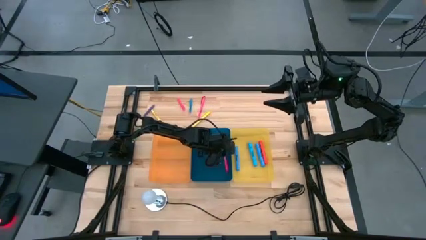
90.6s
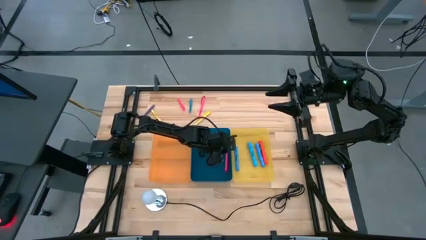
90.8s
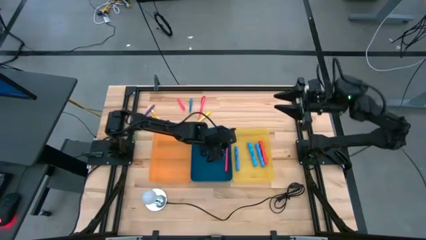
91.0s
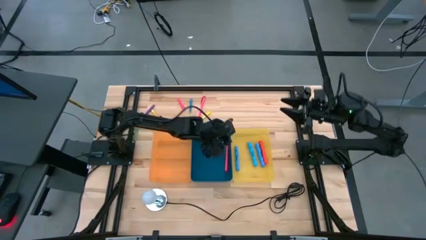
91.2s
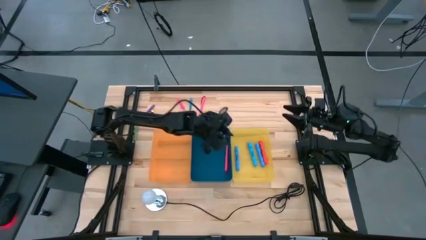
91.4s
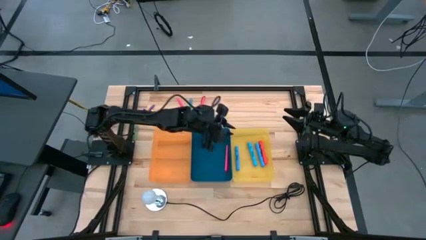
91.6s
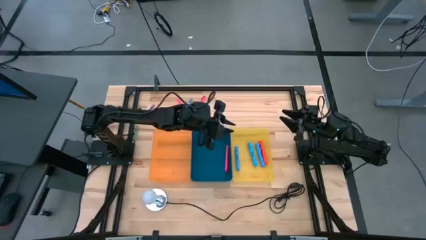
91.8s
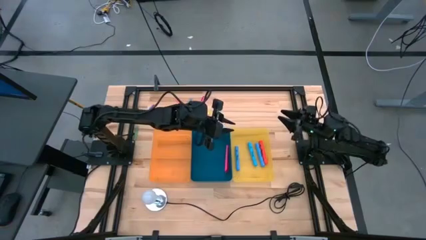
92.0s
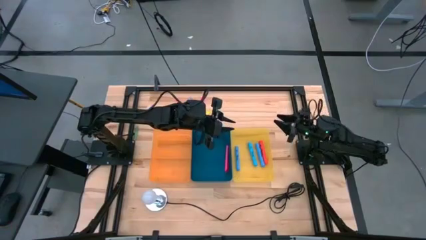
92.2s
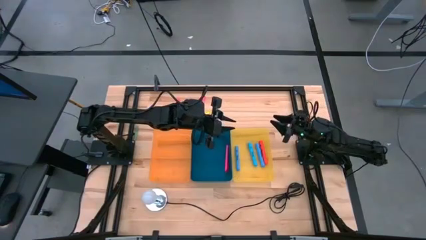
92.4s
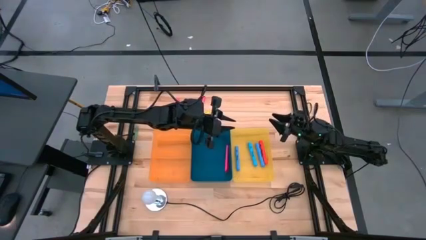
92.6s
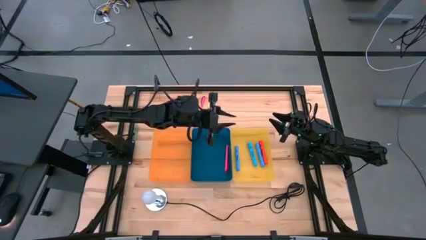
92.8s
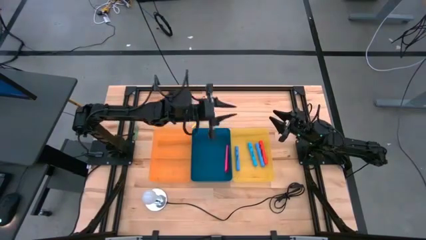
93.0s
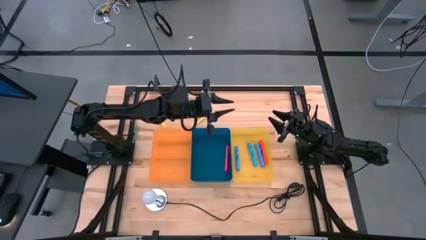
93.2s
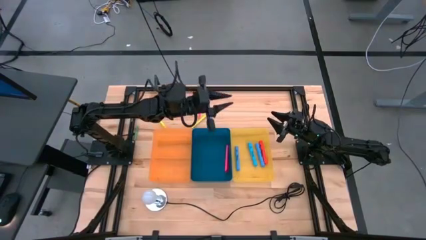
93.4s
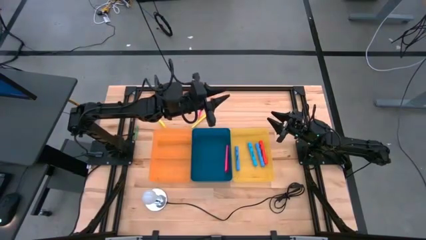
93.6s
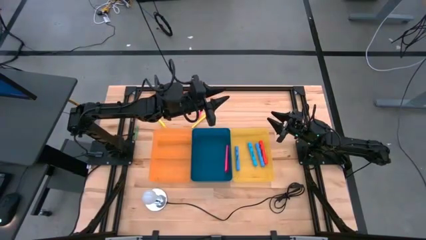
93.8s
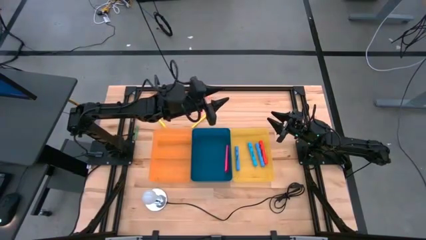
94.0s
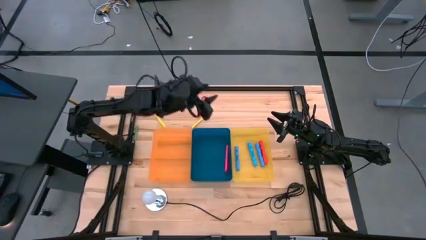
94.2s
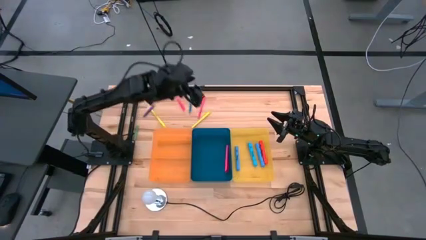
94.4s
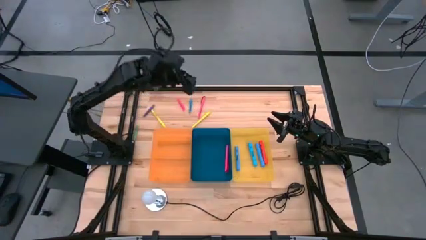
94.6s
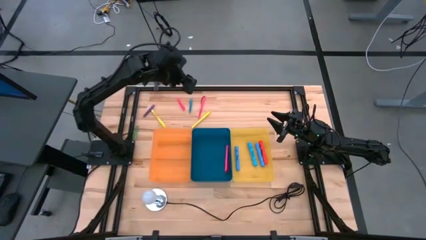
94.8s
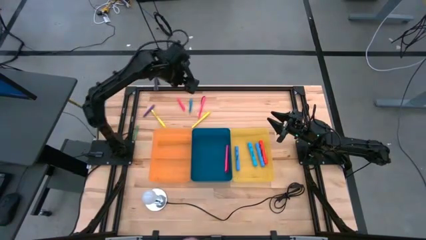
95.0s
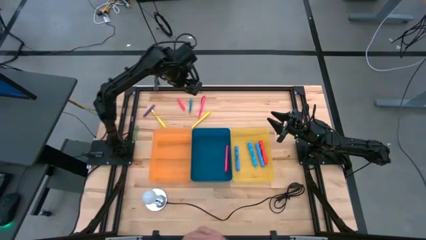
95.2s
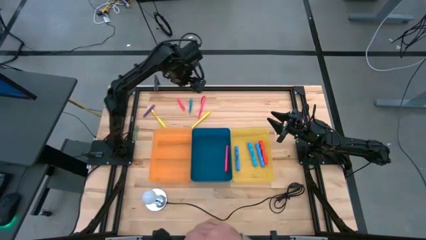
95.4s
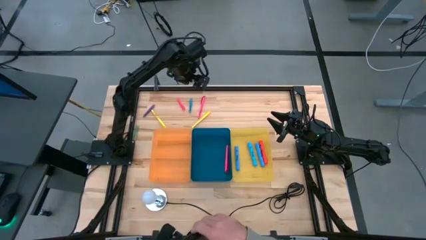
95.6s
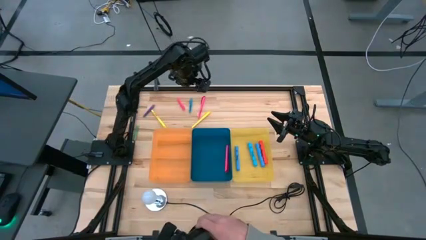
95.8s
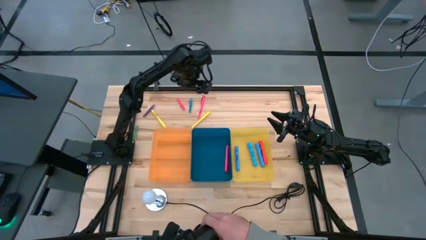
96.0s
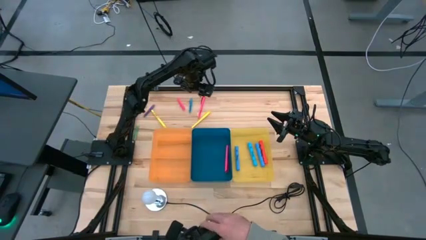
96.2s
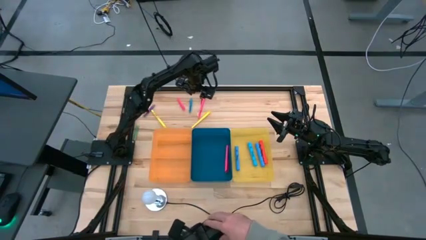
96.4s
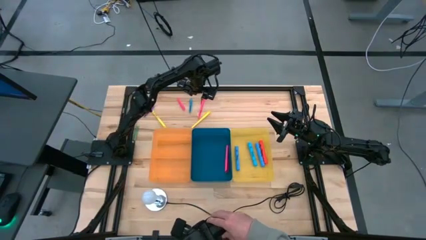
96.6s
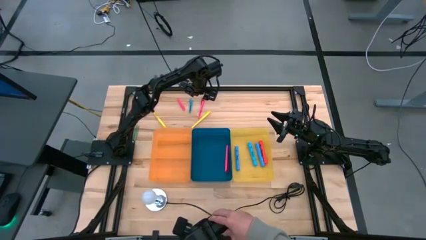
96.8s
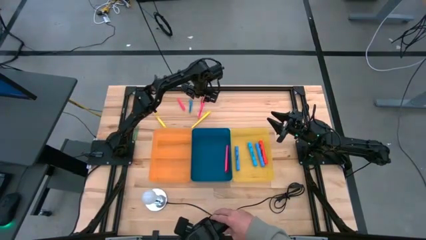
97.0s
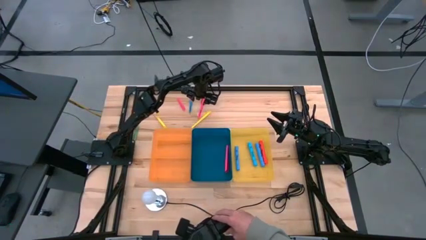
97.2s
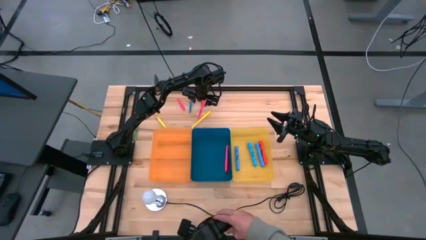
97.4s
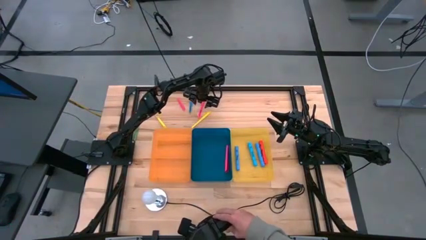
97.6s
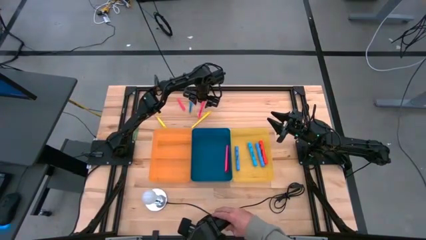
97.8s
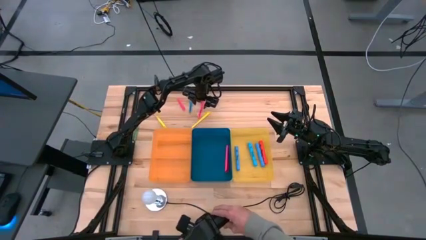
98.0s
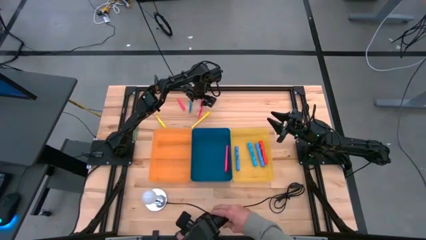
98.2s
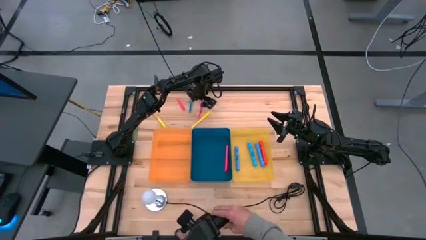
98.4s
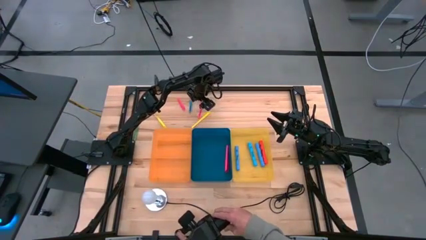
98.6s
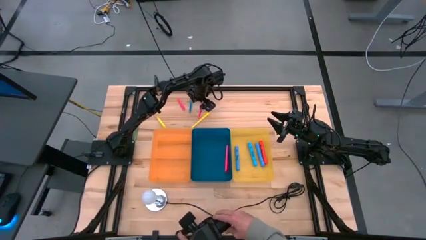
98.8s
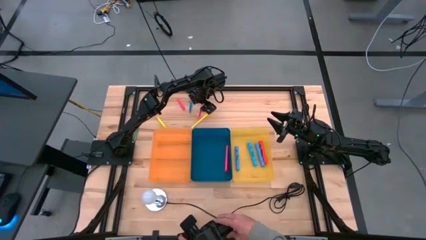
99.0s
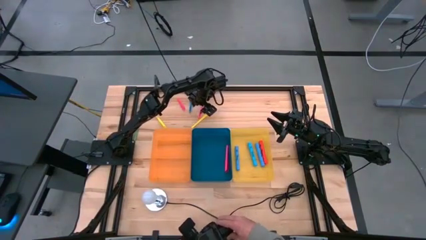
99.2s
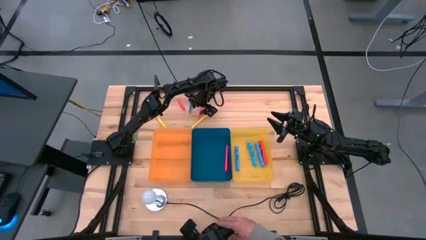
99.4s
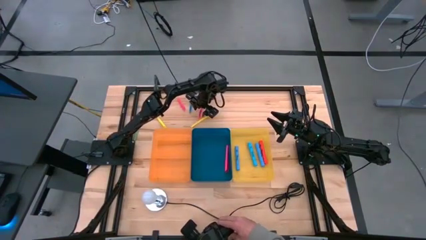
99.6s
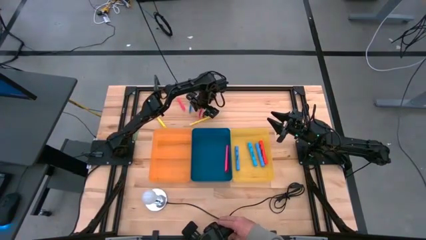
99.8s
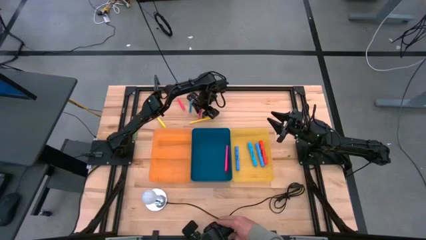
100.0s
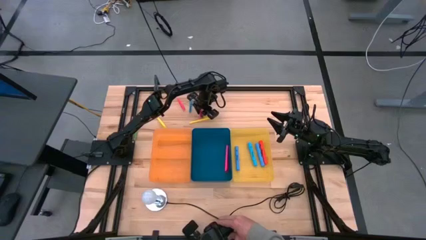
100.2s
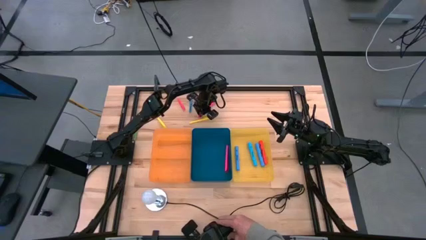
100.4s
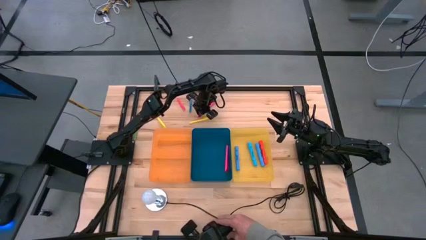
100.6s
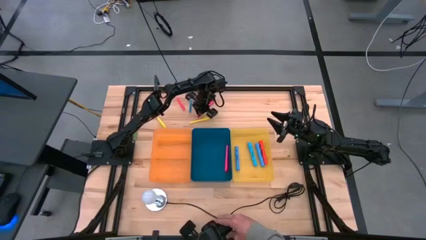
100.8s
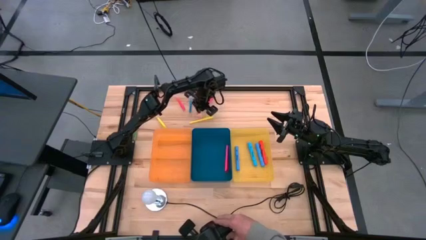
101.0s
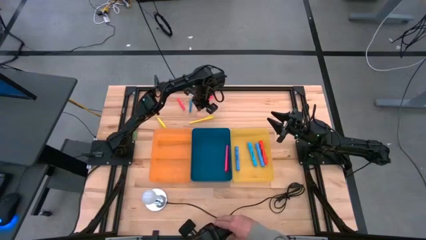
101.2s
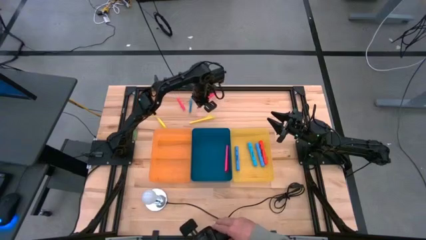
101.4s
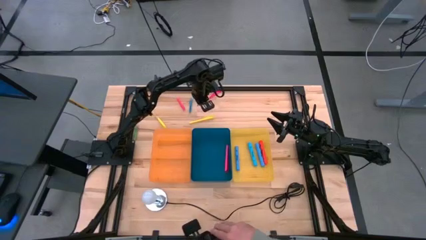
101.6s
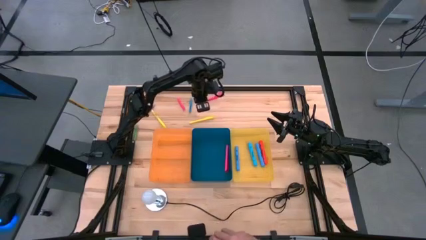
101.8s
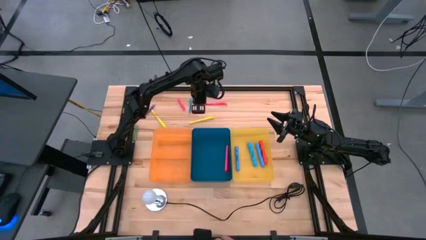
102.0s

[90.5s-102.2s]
Task: Pick & Place Markers
Put the pink pen into the blue bin

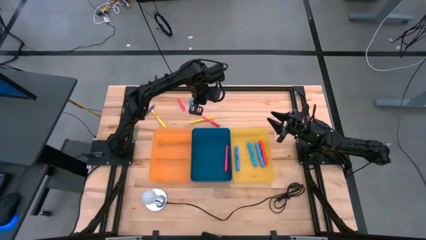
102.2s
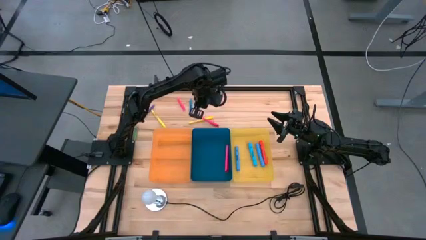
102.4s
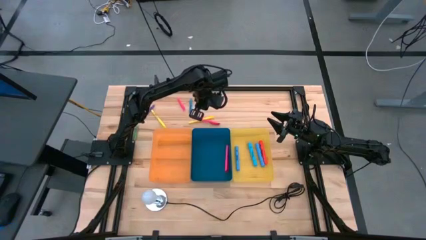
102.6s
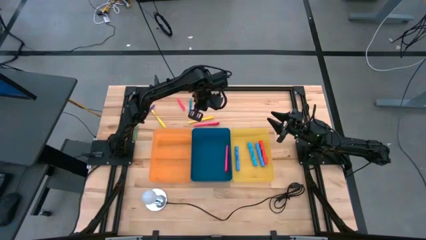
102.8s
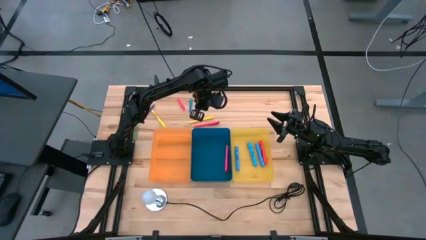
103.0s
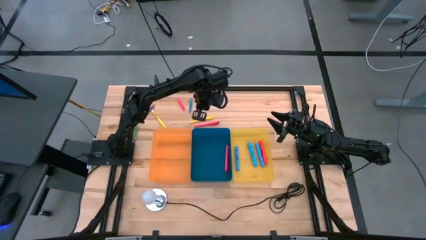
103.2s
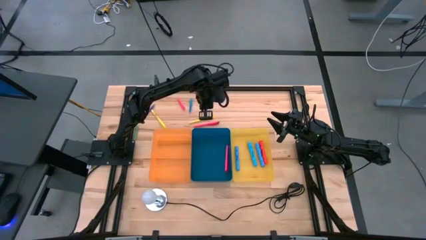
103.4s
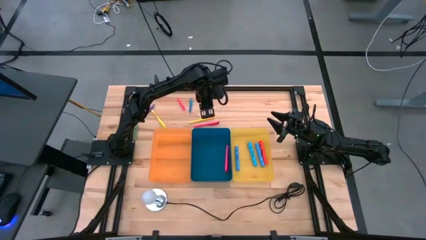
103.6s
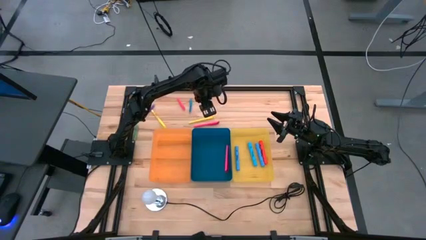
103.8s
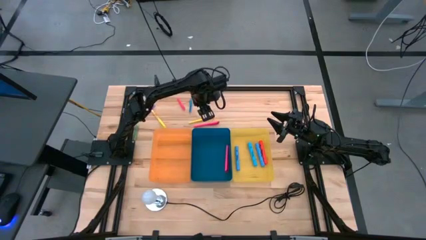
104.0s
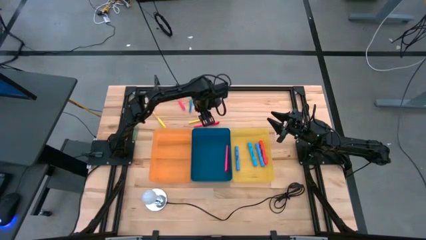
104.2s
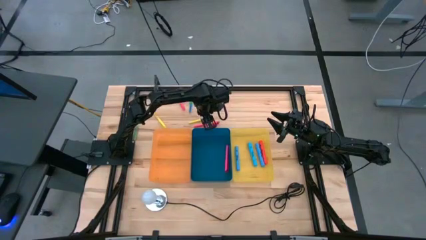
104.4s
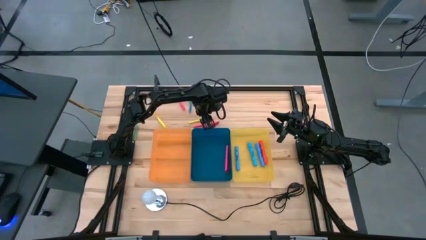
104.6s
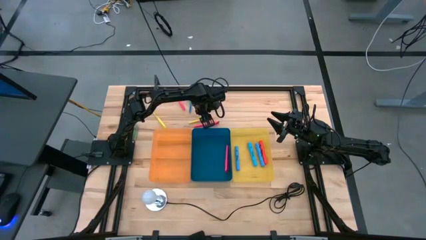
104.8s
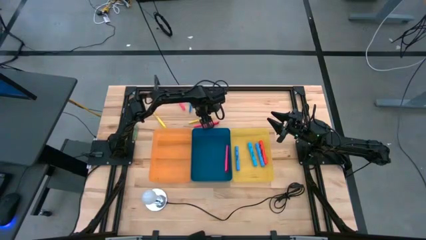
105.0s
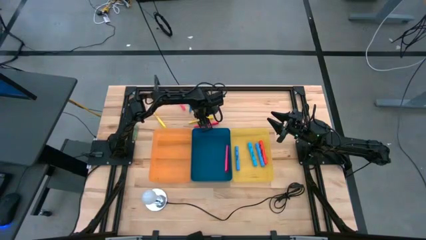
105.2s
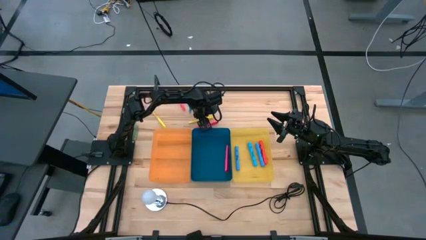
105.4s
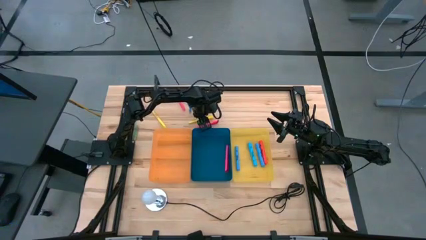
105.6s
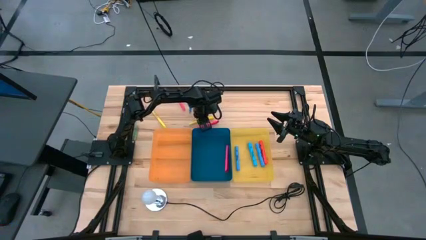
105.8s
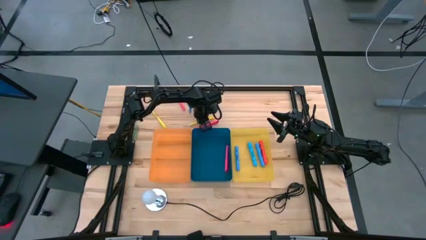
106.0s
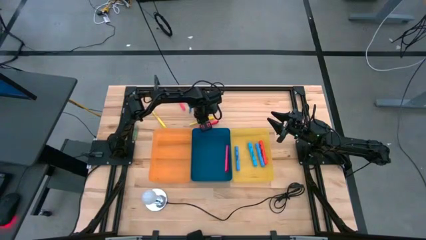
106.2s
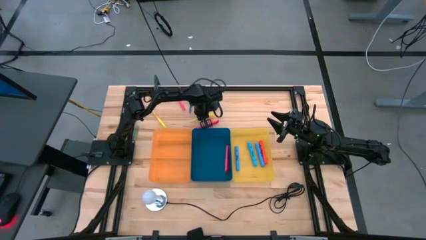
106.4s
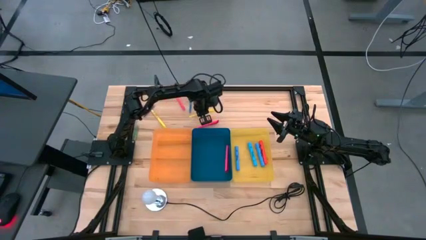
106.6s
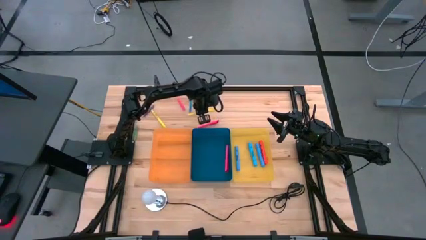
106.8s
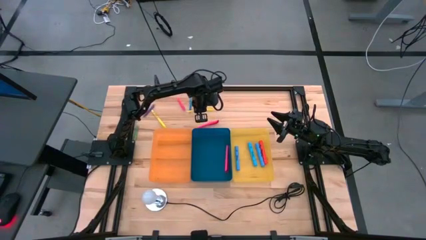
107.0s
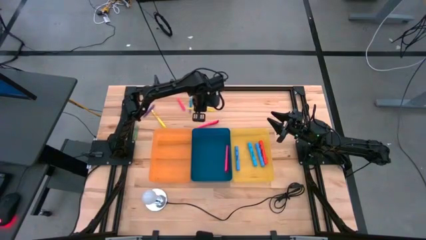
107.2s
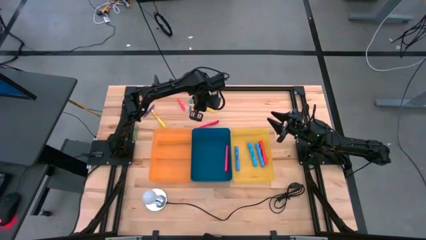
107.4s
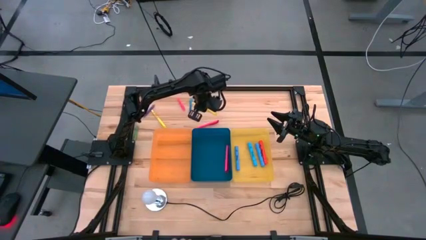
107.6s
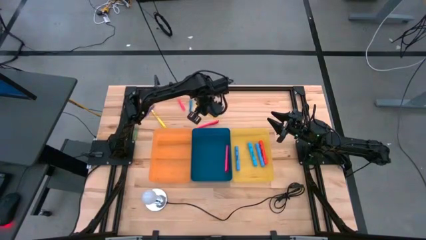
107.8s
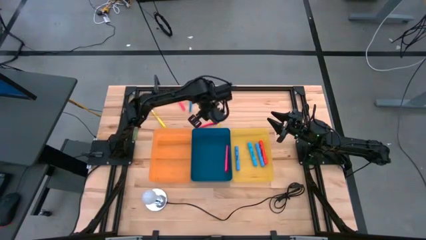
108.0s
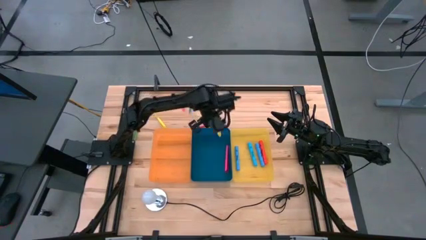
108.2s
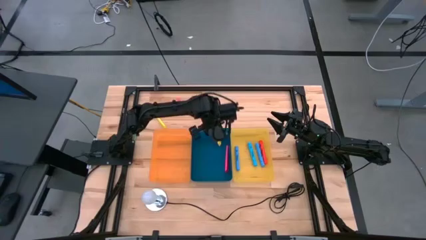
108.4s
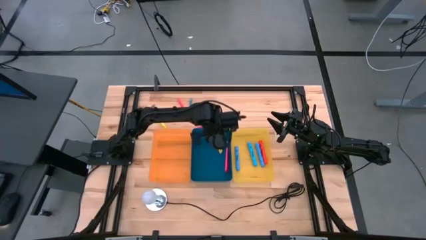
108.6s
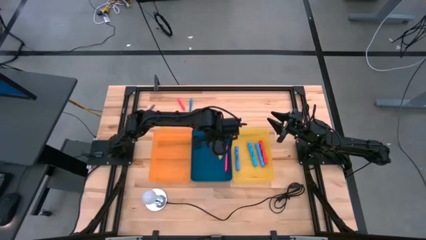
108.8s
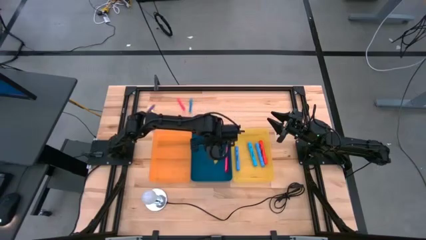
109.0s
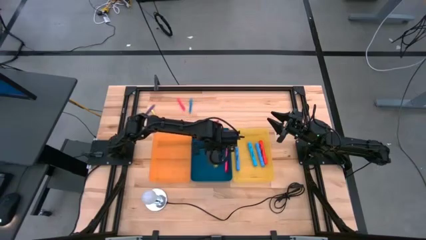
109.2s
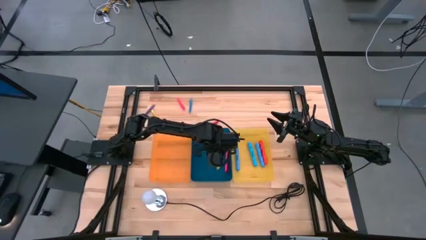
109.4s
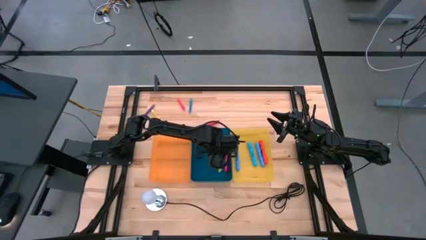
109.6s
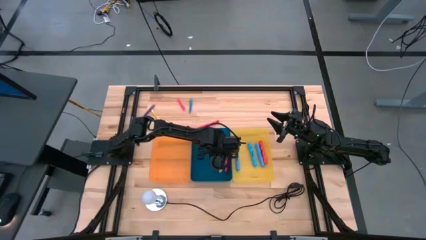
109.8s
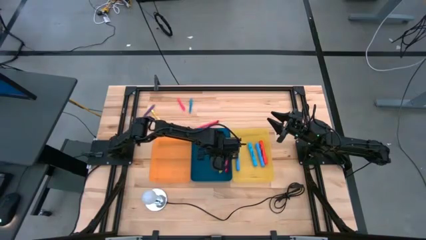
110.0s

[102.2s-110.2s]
Put the right yellow pen into the blue bin
